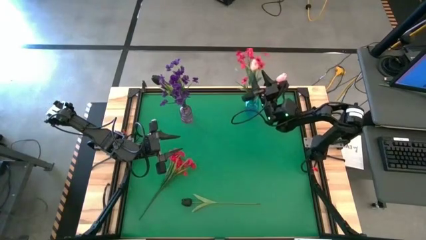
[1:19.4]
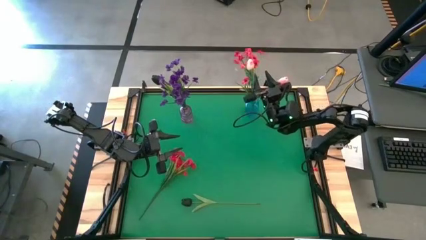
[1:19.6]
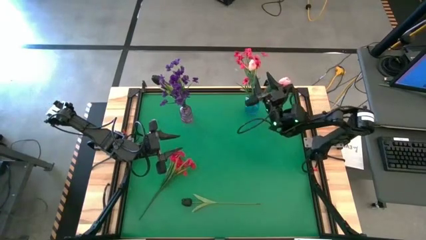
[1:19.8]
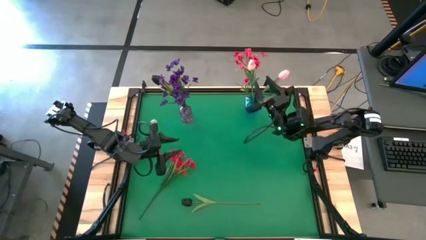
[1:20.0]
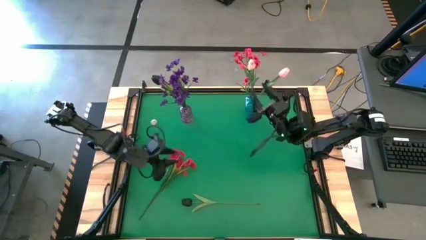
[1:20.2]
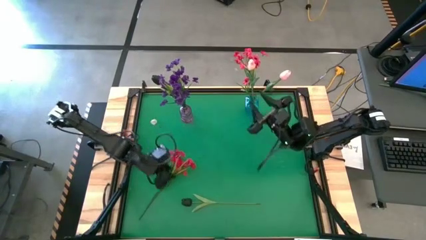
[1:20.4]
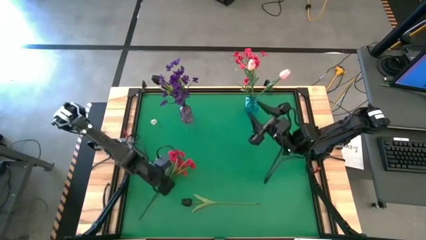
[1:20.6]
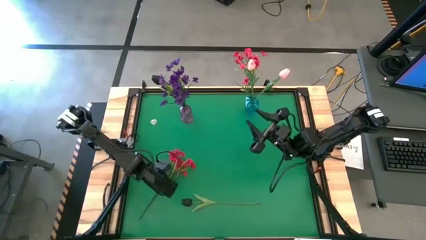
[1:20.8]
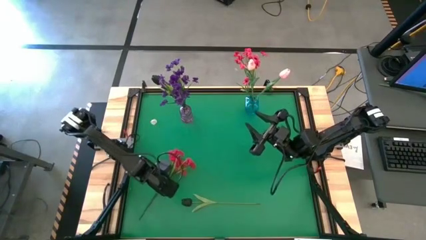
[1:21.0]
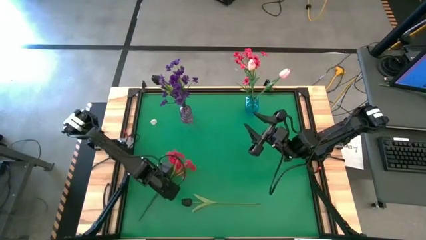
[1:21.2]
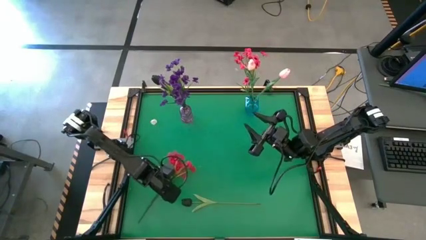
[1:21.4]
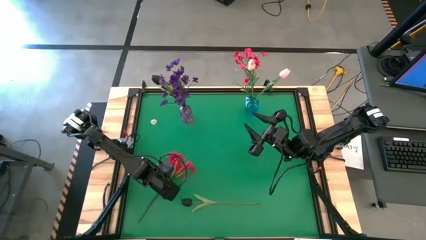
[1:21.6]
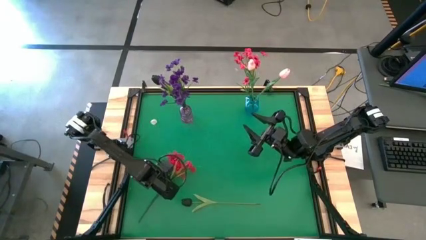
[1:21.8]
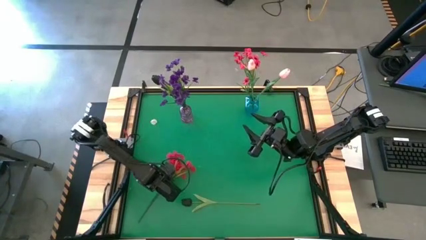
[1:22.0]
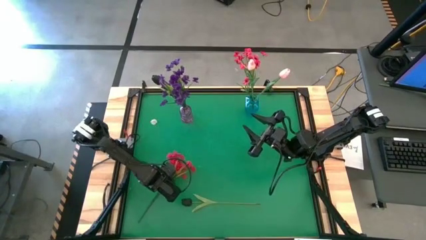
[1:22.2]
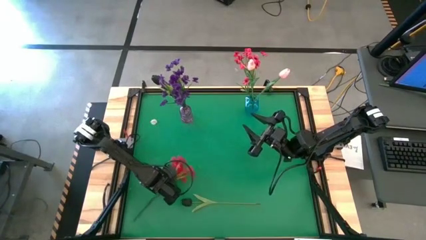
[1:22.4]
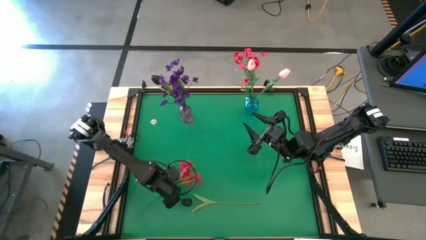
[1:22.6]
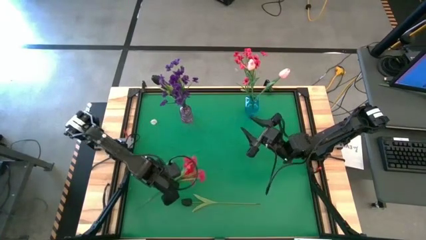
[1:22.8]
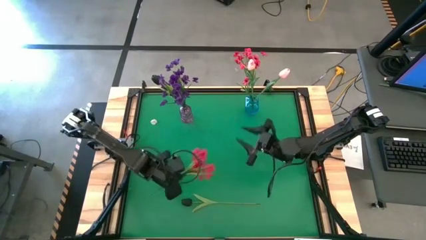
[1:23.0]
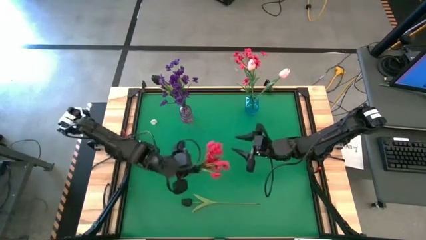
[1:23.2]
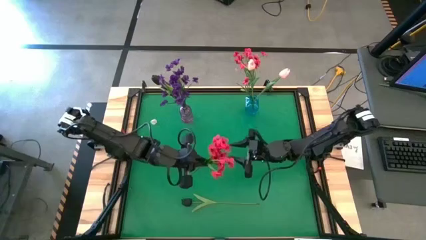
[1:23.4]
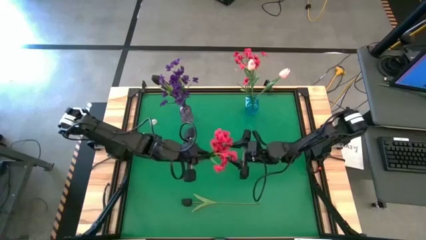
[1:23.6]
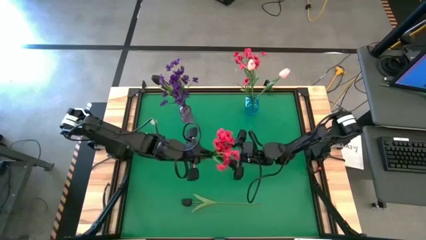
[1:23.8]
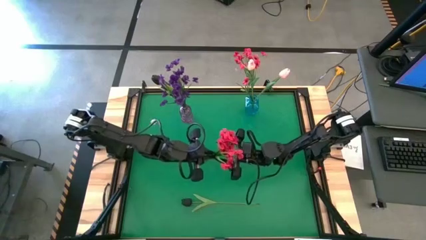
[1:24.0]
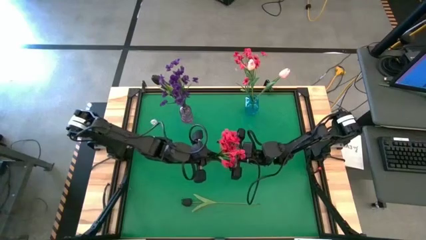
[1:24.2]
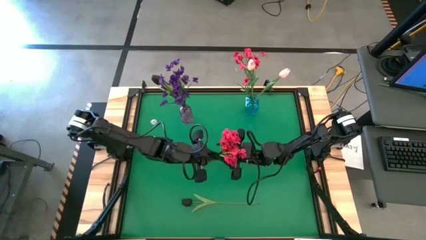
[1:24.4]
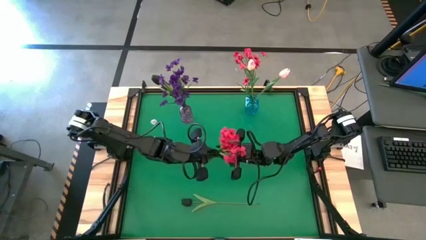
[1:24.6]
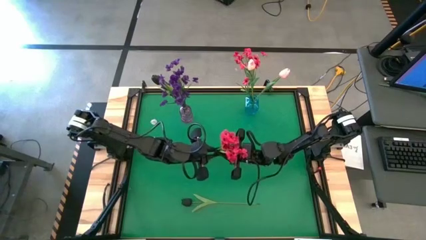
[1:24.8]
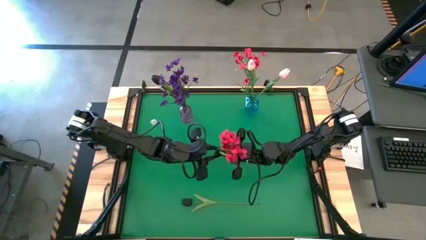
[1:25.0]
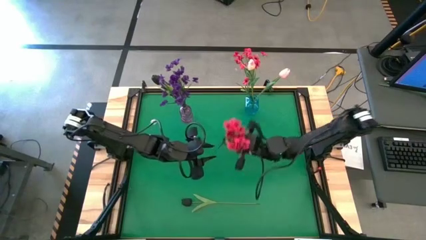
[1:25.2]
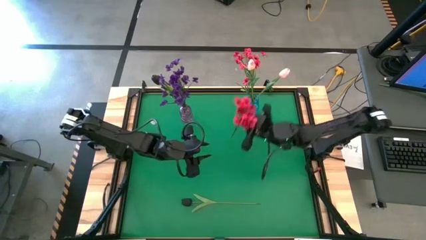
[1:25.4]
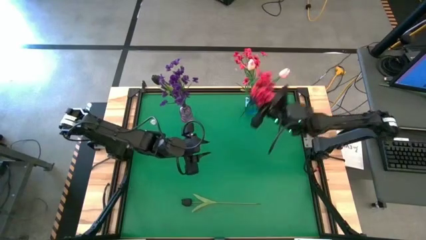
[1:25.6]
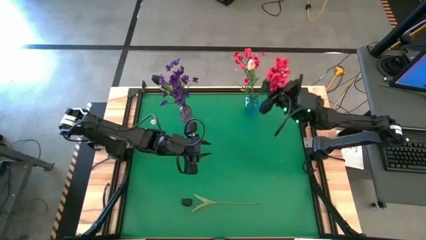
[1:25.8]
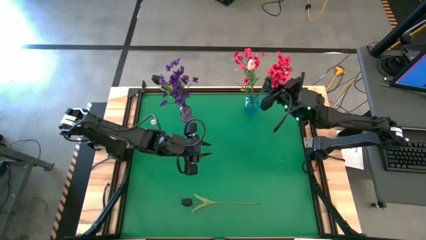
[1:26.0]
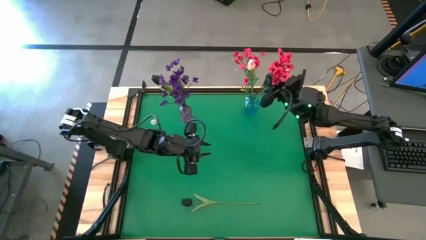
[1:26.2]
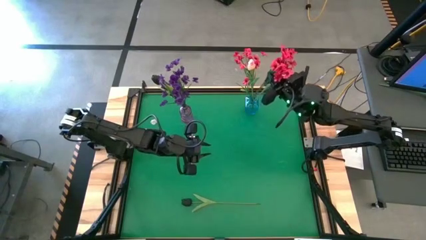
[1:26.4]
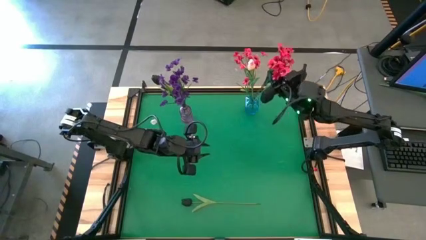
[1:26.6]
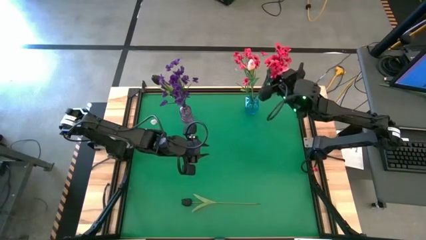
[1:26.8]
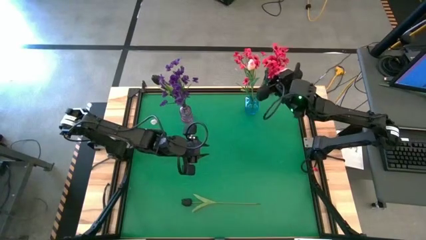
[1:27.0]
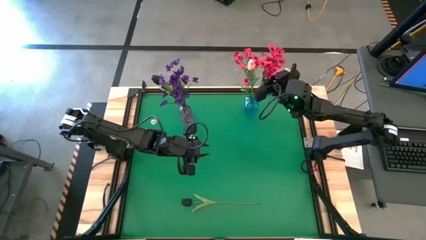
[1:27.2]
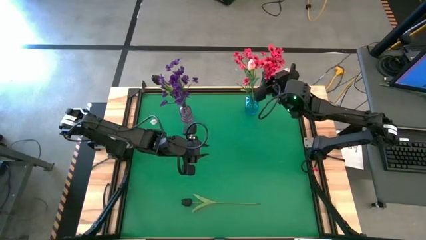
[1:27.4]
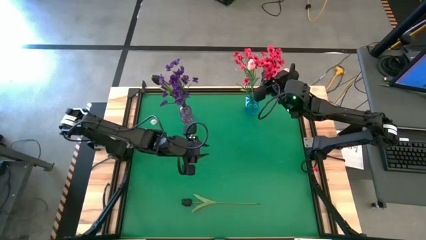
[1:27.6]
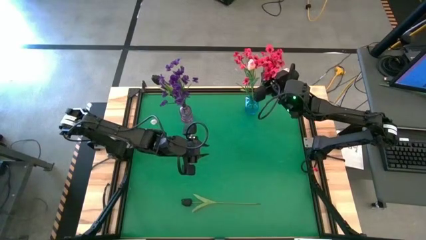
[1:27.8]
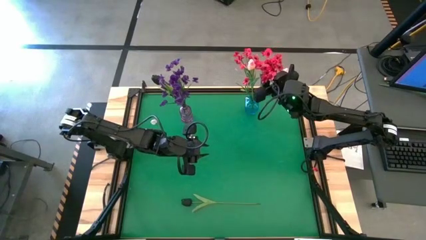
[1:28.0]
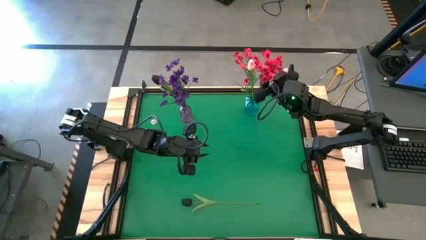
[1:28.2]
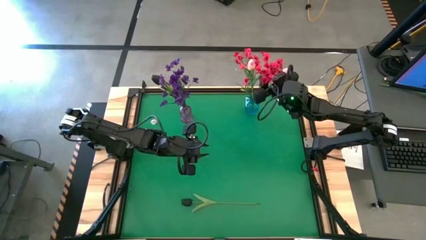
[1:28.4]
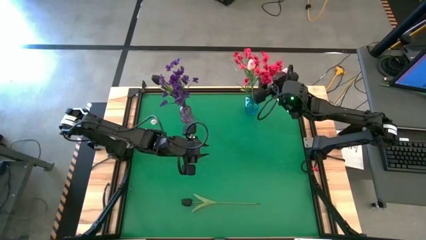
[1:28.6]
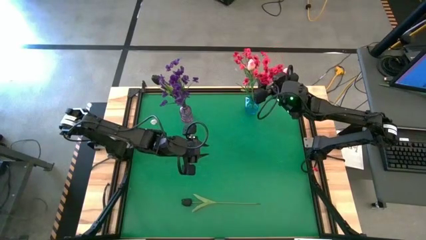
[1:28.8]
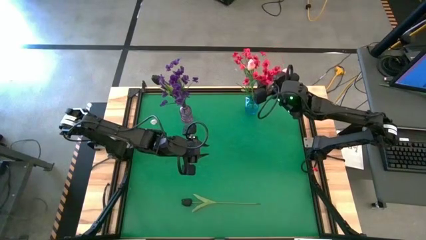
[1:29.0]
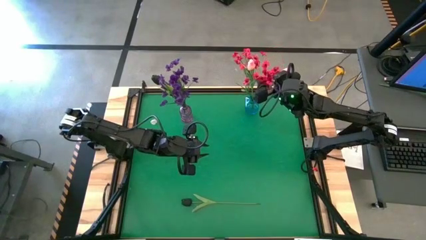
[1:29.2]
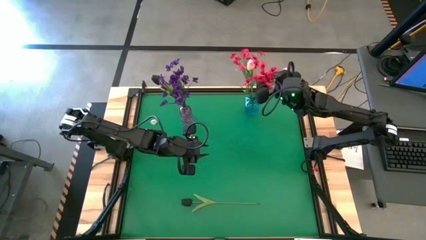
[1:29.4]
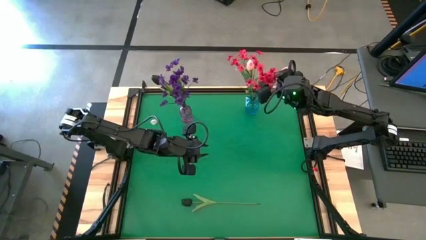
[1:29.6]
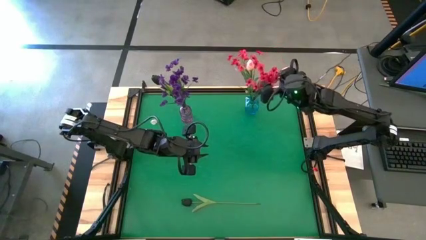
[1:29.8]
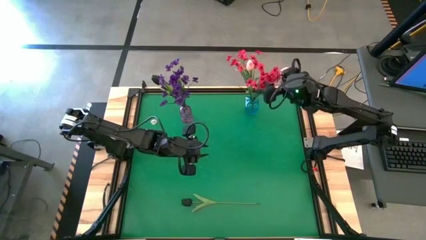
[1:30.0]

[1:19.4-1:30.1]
Task: Sort flowers into vase by color
Put the red flowers into the blue vase

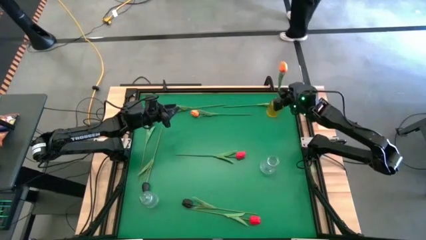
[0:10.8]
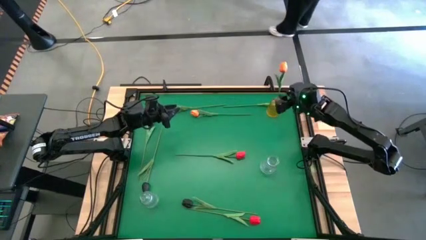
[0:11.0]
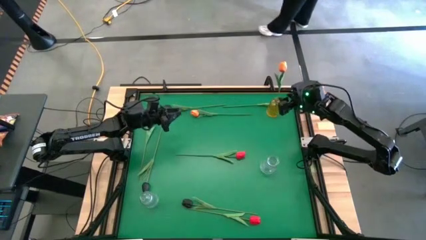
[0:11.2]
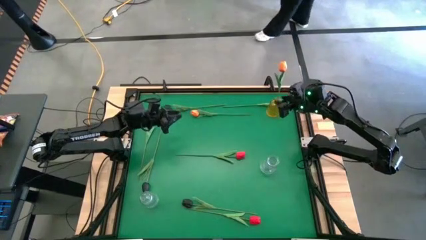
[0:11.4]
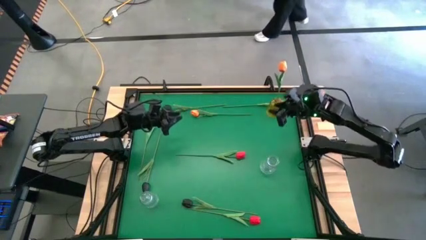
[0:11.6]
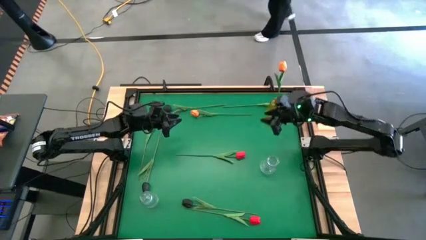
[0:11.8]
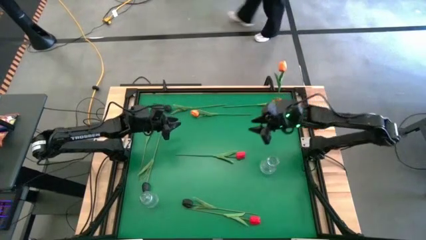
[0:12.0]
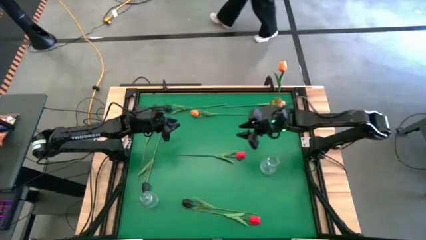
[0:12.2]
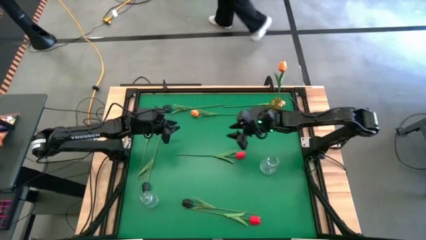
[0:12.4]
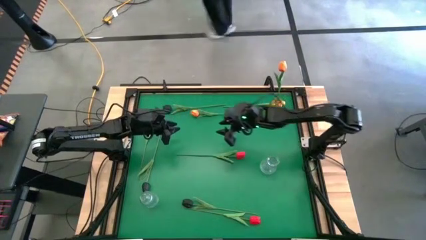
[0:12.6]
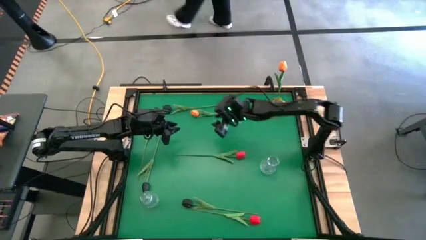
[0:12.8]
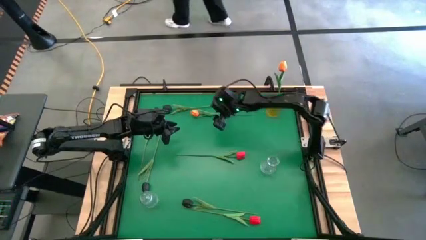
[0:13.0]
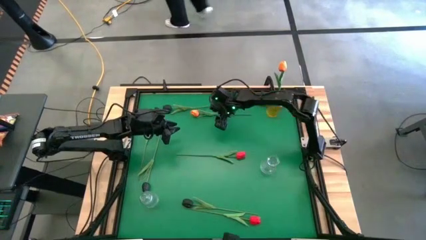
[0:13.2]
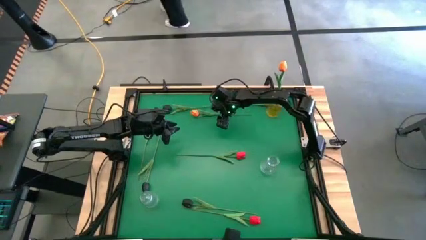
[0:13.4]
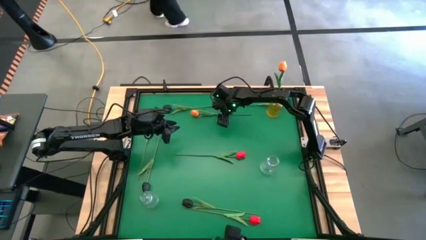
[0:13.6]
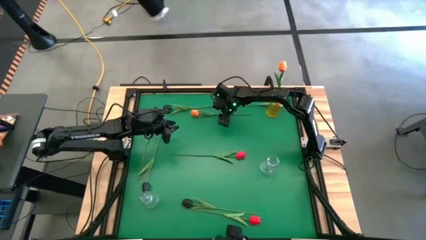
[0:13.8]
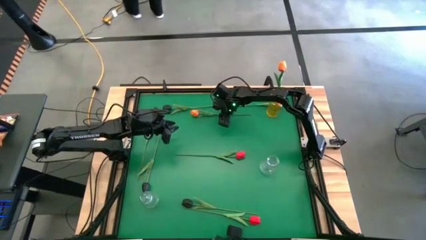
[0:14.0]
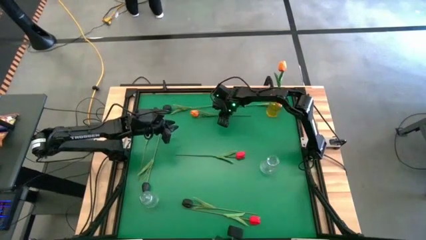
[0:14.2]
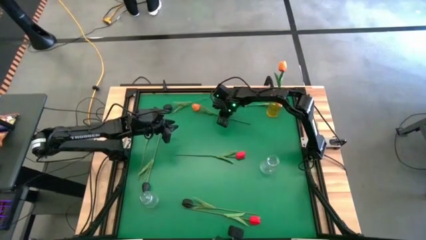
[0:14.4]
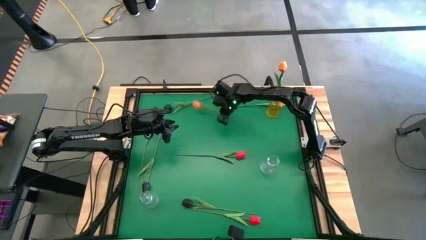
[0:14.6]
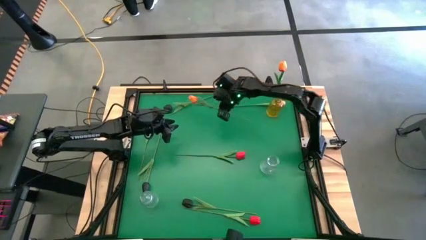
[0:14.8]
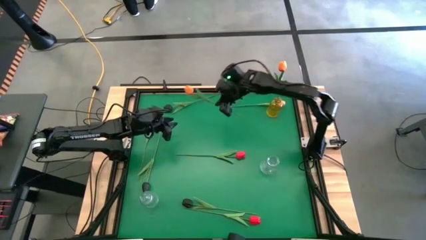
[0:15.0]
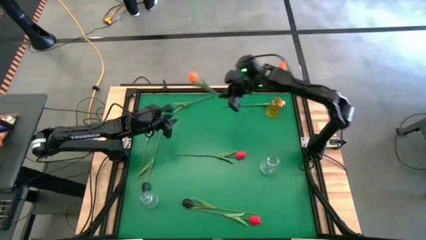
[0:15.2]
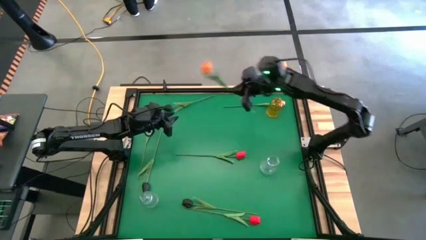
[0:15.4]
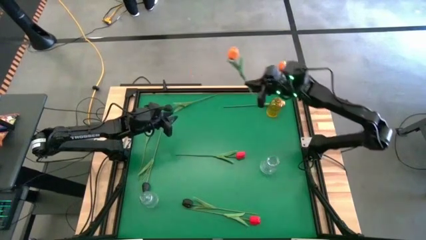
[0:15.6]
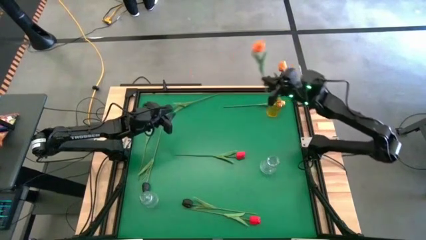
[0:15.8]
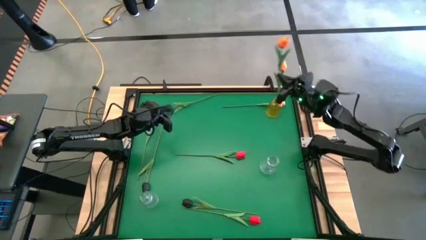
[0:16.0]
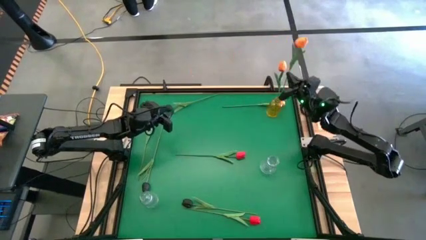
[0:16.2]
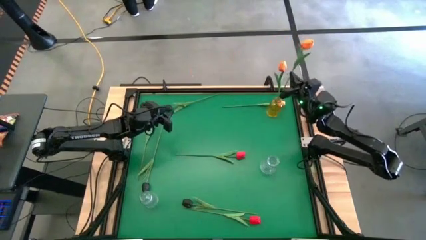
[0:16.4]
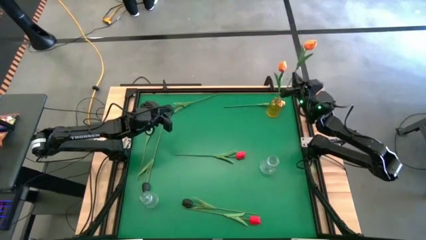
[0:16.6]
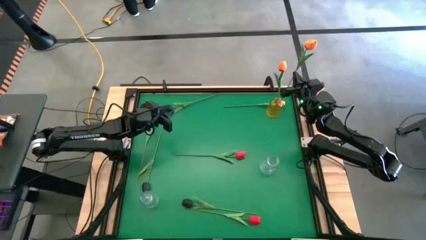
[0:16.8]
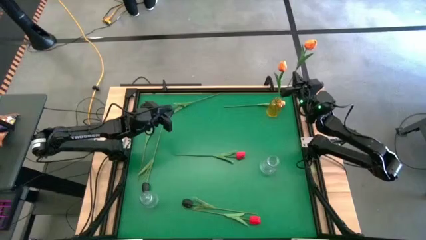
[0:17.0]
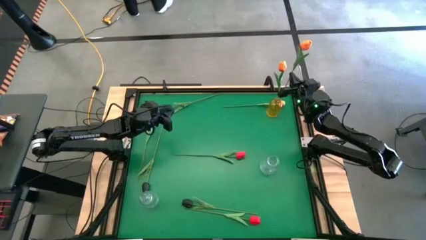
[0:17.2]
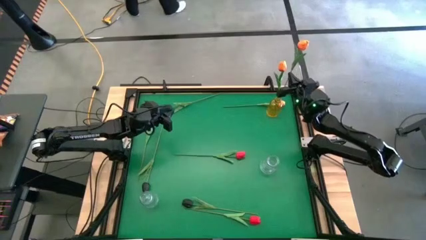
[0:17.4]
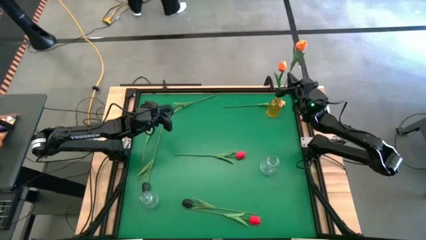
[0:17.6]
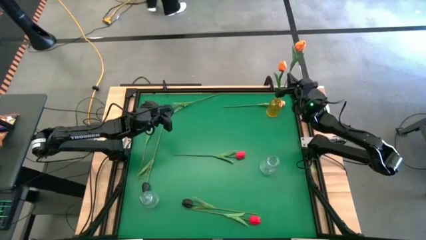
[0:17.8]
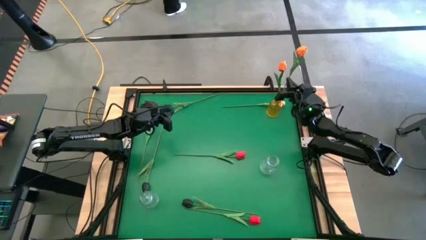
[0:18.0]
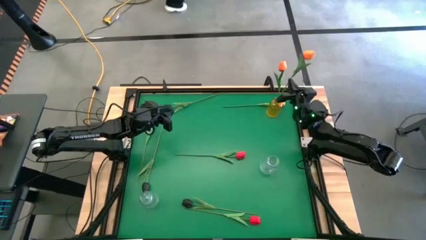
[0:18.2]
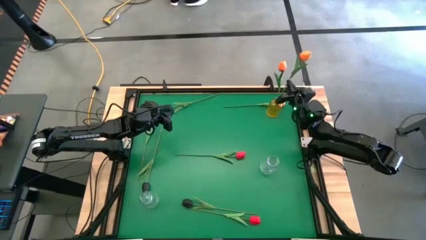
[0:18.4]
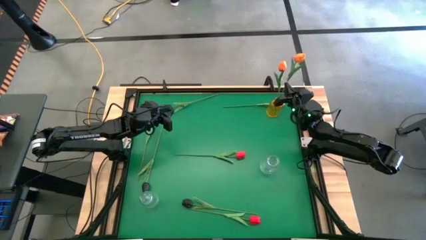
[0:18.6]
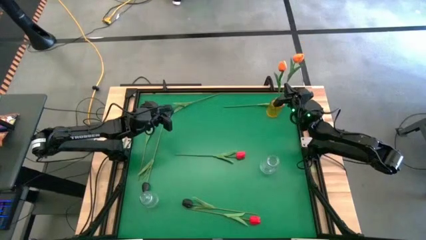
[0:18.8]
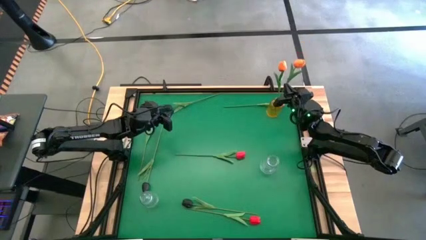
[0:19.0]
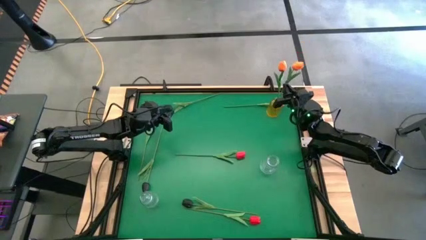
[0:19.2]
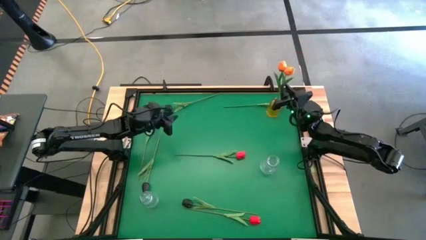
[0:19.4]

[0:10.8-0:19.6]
Task: Sort flowers into vase by color
Put the left orange tulip into the yellow flower vase
